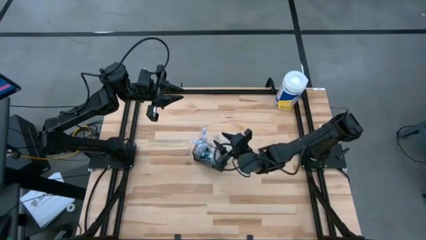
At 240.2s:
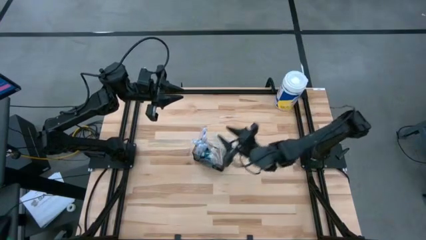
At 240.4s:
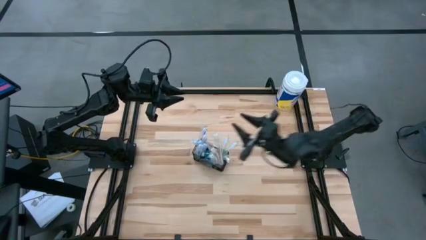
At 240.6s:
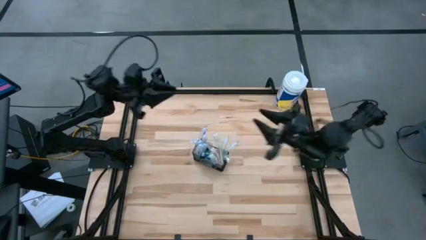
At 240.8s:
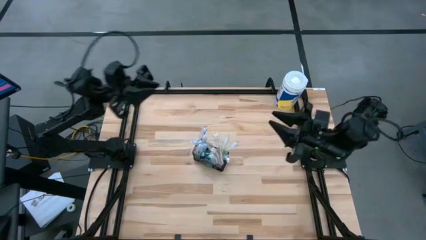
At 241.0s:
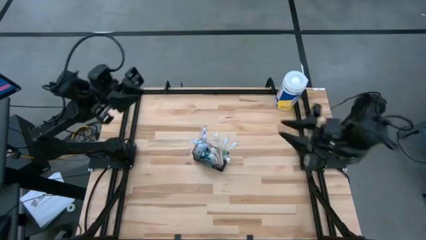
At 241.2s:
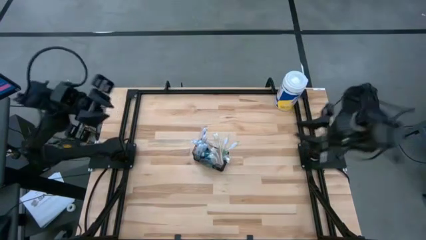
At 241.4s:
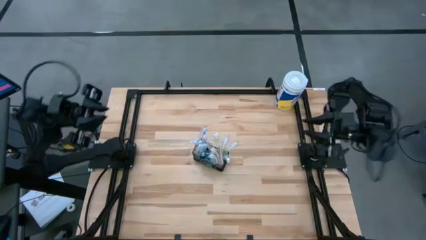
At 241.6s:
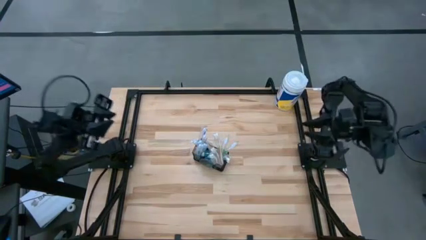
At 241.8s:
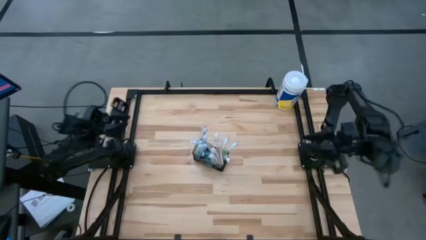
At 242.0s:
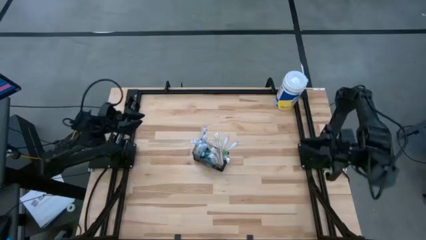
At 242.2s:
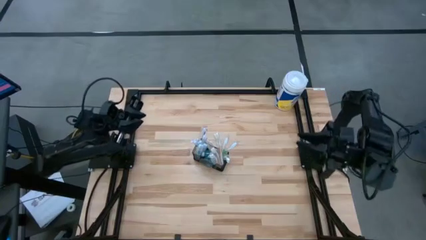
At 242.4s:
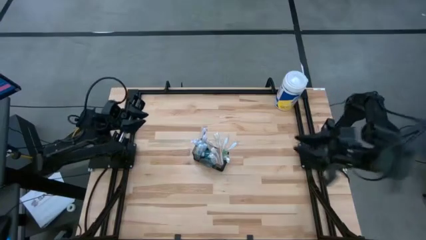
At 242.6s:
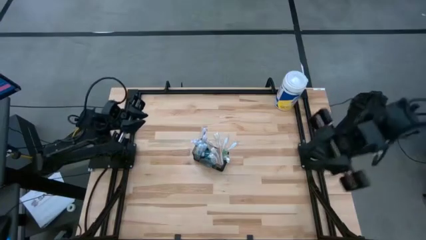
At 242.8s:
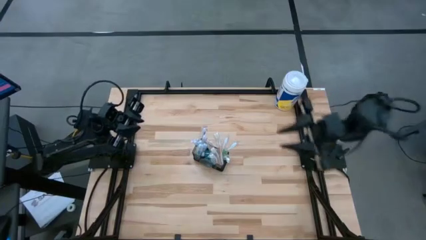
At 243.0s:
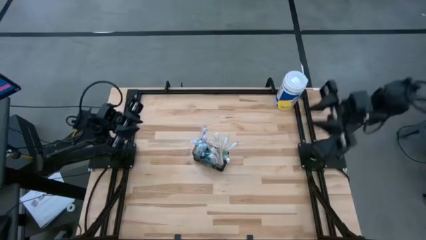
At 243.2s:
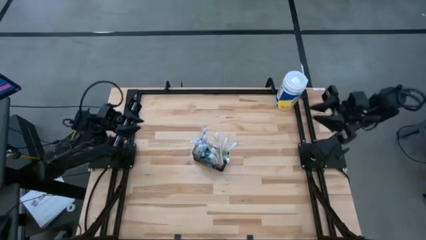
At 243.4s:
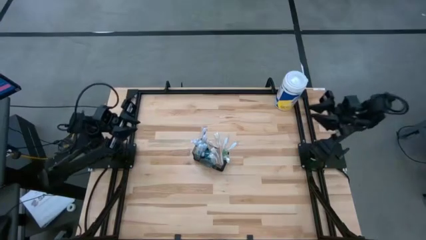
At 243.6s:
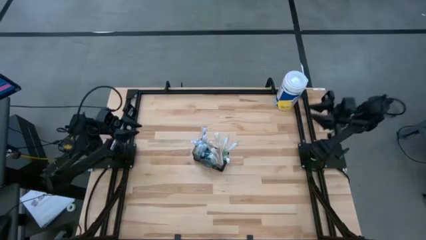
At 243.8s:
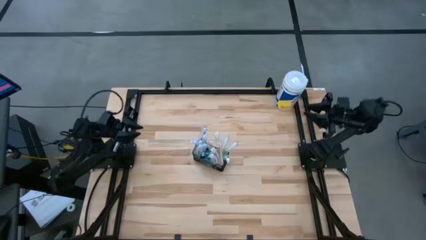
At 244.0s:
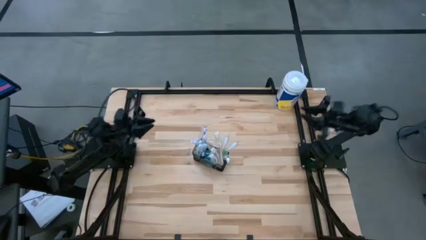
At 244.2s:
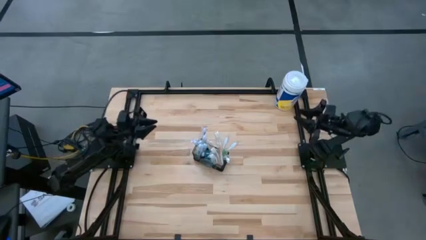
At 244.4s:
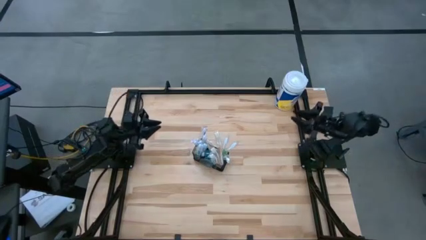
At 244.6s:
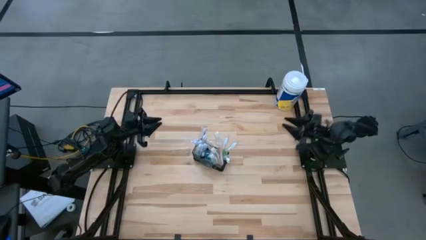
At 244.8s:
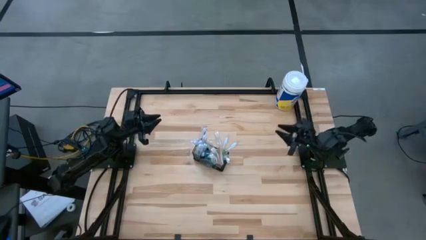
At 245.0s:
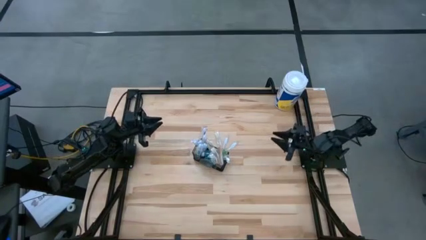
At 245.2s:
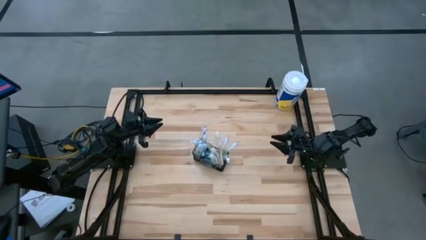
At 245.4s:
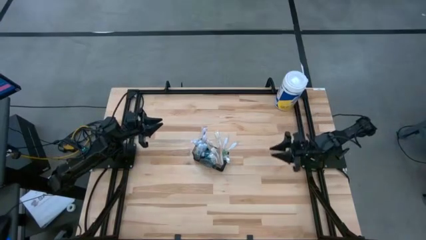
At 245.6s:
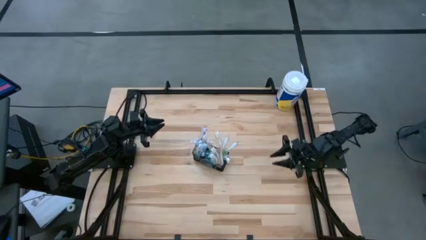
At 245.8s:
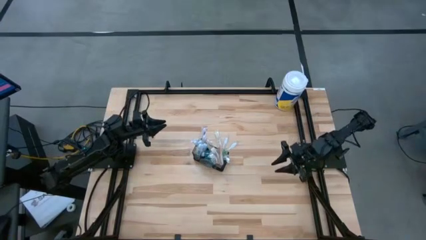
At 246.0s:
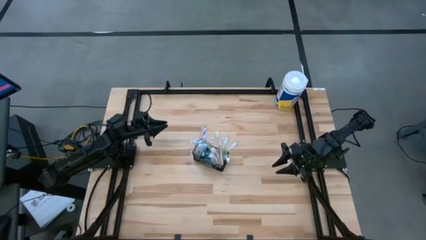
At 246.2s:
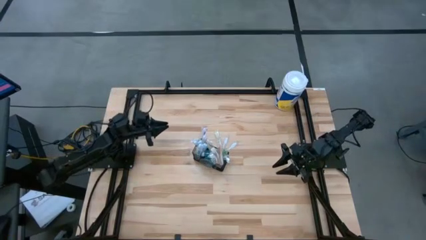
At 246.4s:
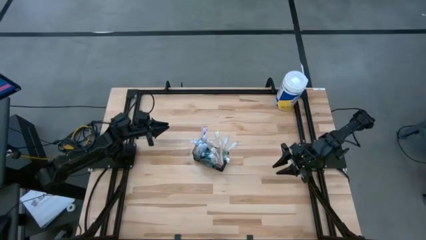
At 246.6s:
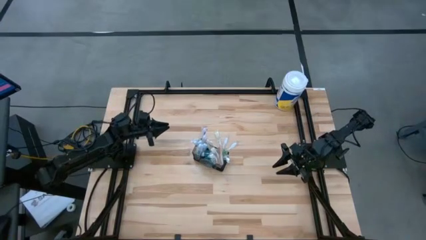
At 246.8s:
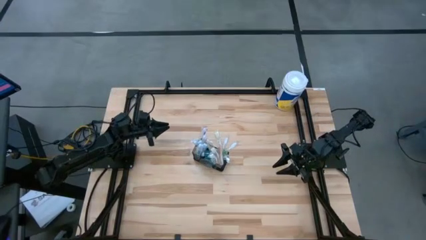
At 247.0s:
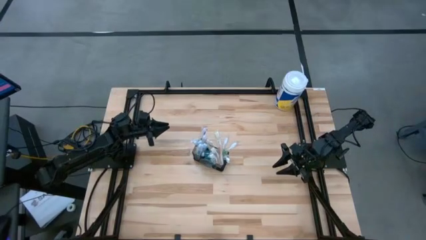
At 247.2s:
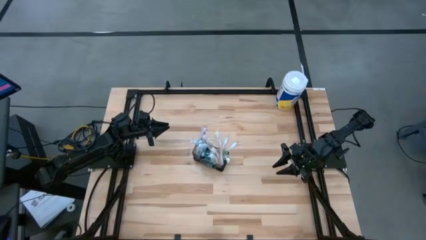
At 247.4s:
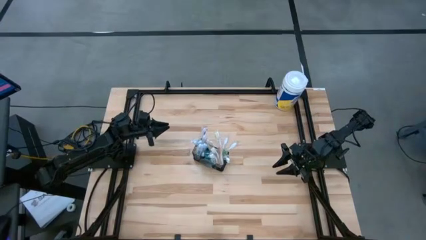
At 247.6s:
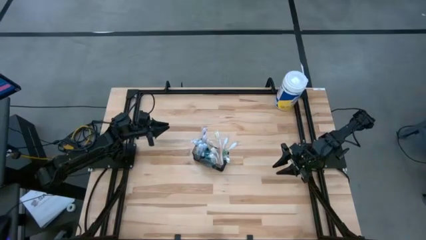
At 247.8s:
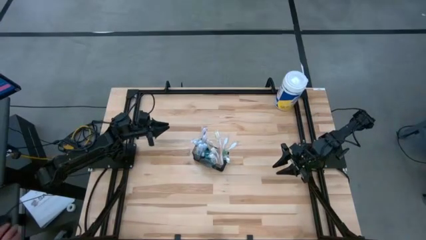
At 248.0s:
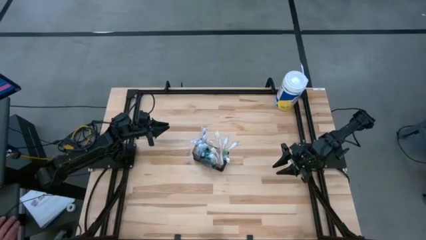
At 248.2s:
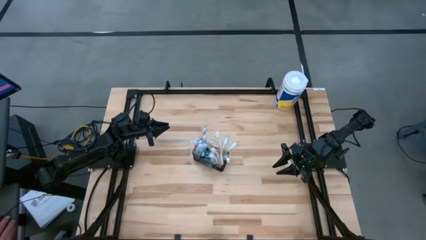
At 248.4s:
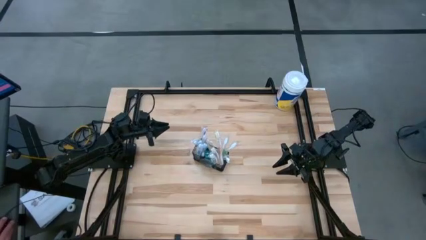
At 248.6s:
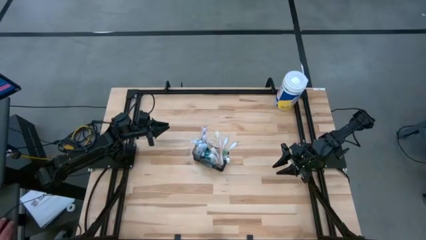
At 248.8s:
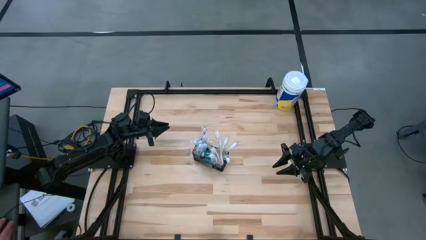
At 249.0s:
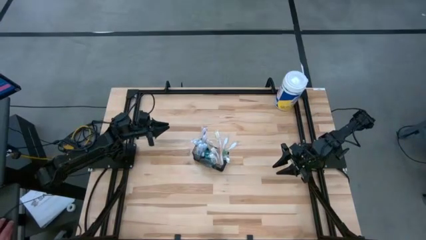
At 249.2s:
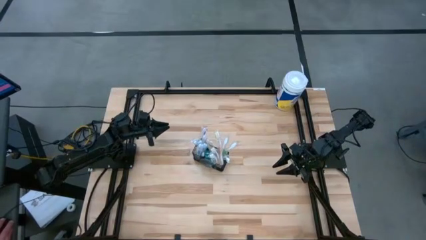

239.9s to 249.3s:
Task: Pick & Place toothbrushing station
Return to Home Position

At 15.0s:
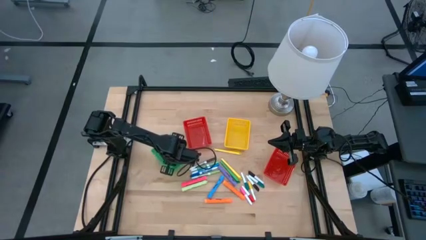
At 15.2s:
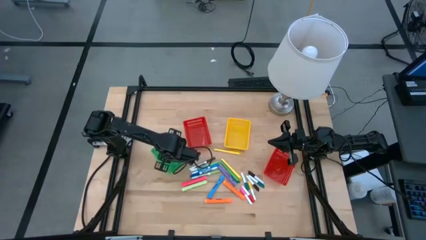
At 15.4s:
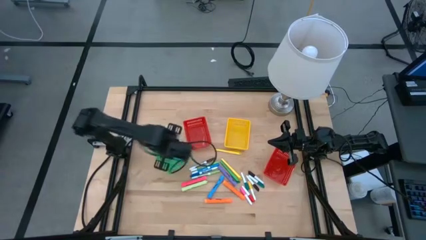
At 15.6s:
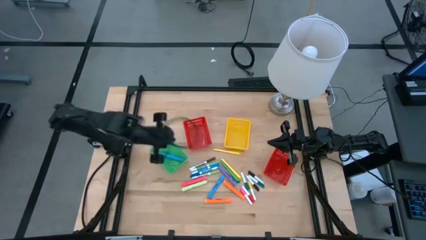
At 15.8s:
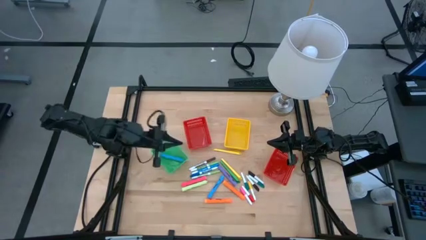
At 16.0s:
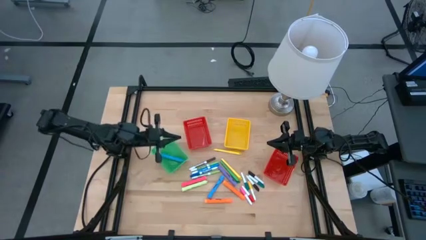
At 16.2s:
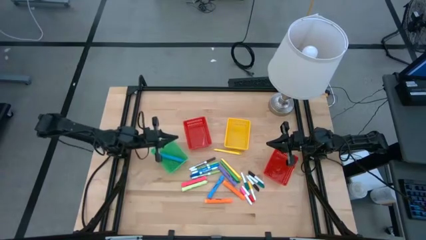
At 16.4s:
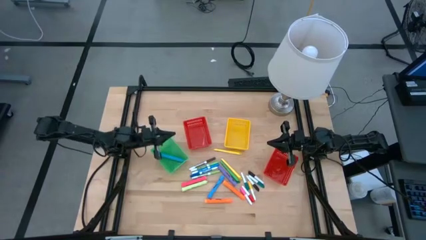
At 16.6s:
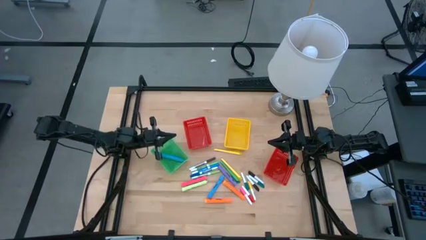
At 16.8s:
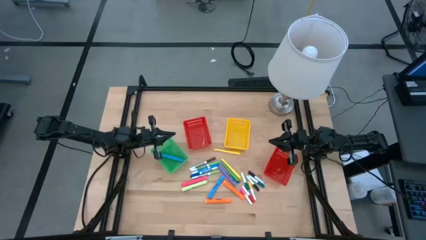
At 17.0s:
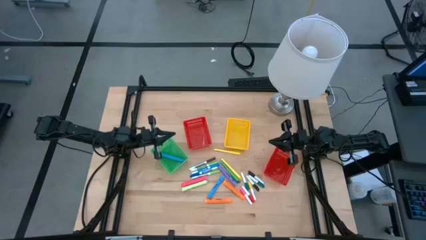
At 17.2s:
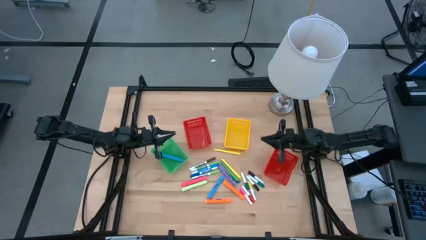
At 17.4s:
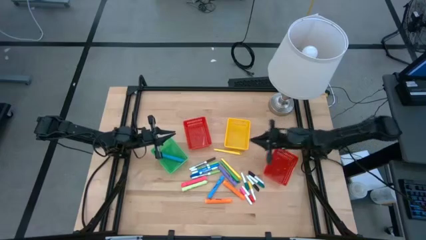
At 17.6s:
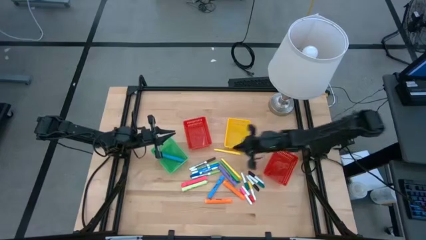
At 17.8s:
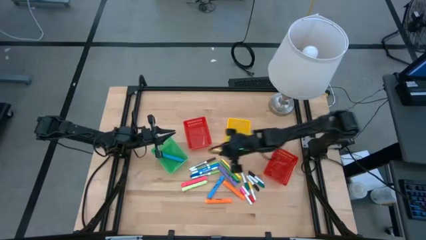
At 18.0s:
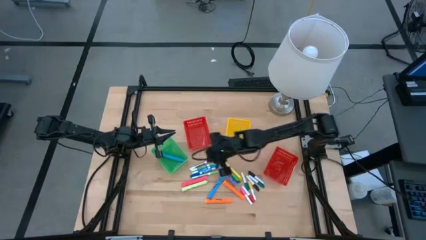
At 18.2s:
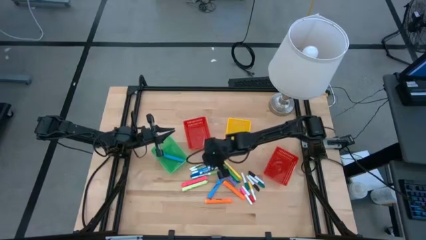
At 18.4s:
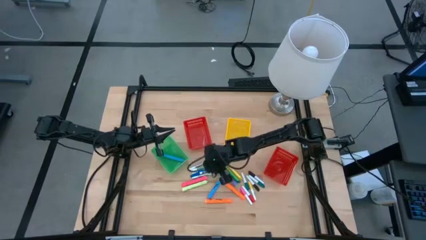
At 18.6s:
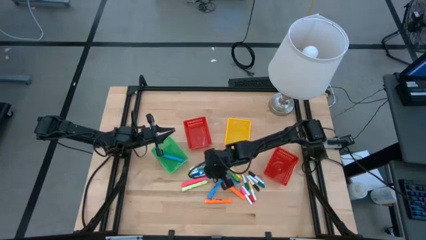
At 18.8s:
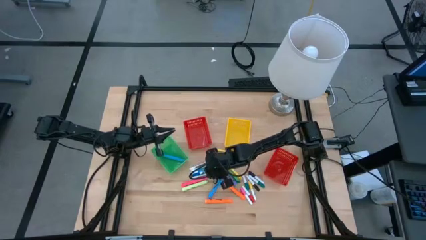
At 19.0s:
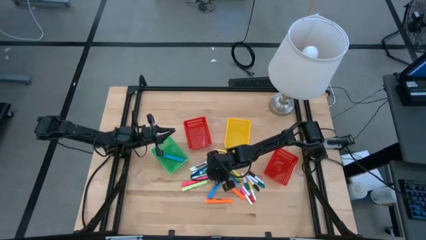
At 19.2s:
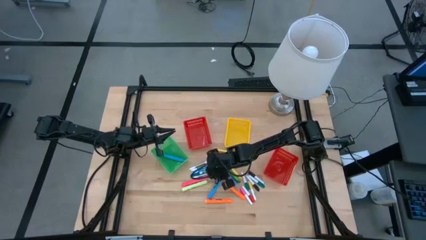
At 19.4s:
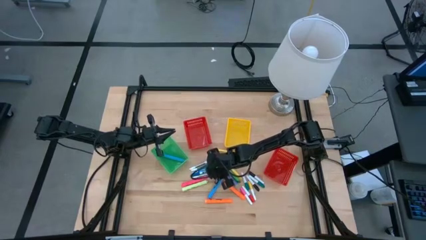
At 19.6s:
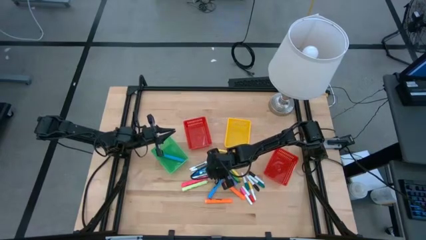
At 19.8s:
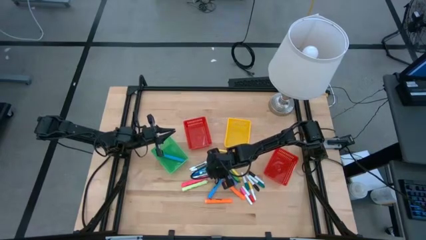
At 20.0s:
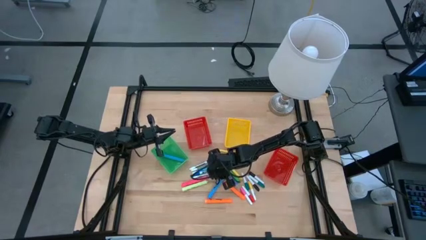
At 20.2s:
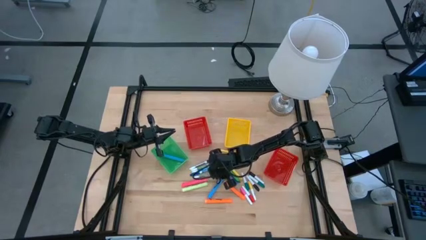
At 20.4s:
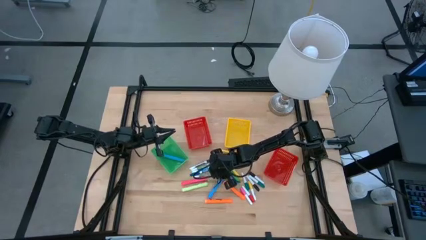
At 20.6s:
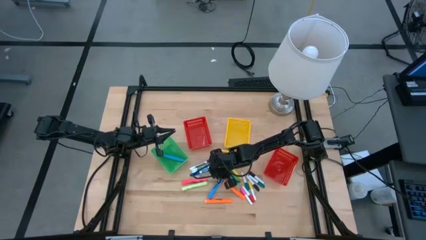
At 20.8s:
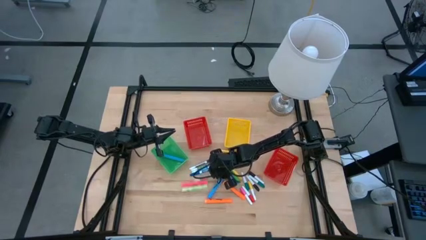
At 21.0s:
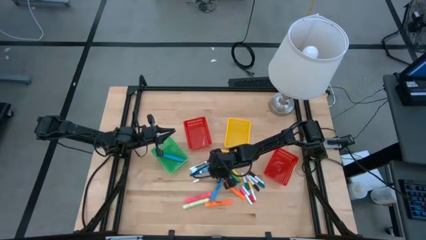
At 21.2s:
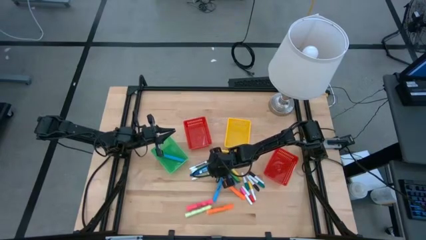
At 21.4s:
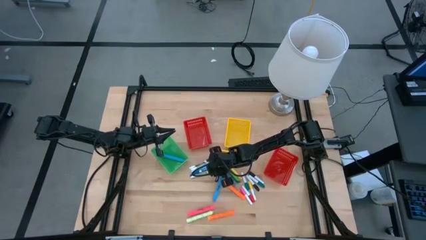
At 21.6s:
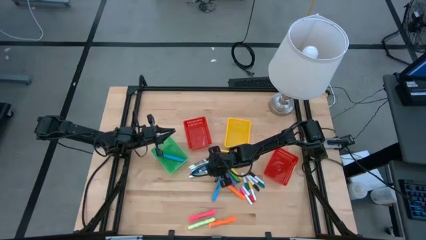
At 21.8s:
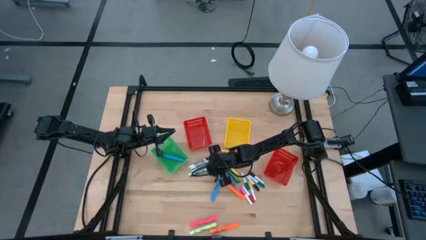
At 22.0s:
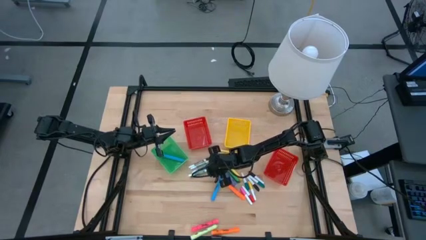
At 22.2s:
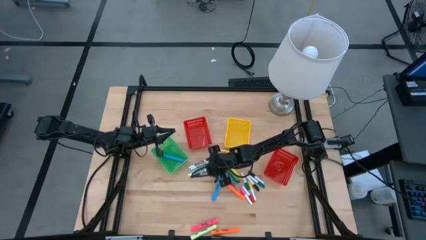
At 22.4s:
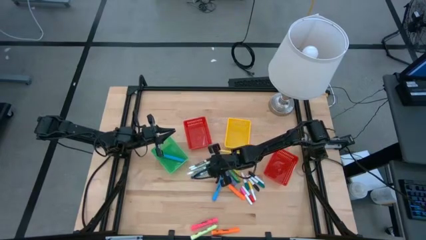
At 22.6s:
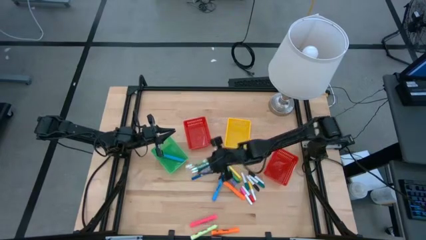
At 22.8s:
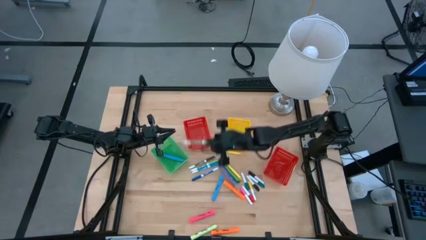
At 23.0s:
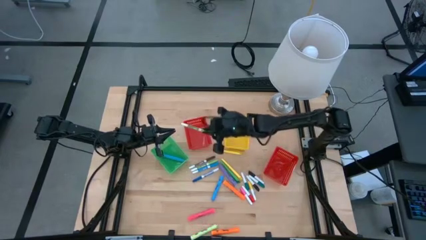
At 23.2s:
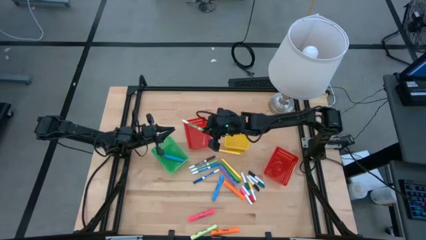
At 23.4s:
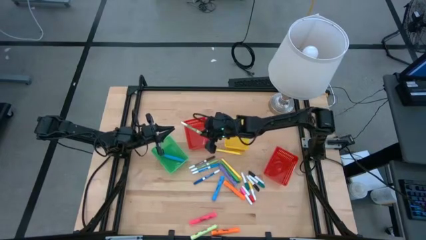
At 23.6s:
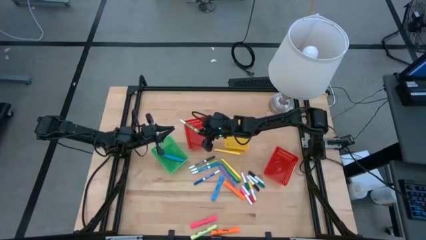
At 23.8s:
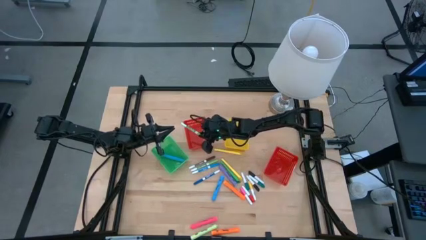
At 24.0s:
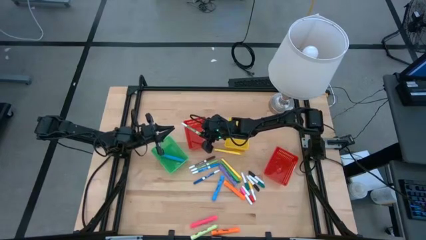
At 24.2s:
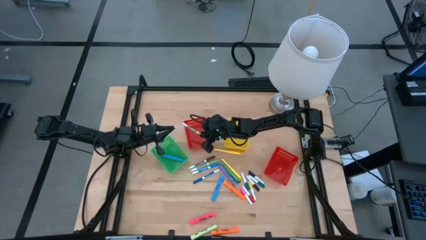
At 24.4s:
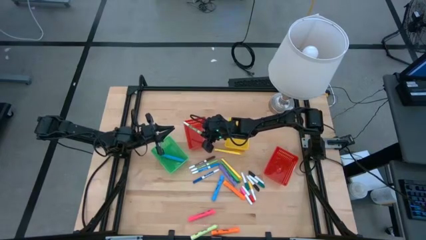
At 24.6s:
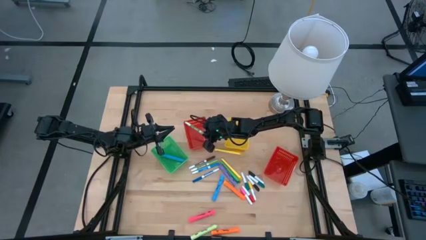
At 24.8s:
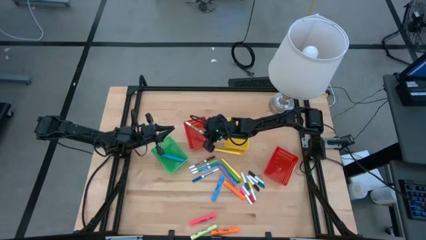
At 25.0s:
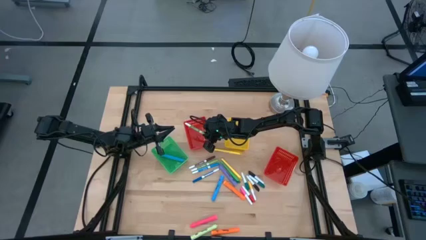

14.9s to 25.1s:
Task: Pick & Place Markers
Put the bottom green marker pen into the left red bin
